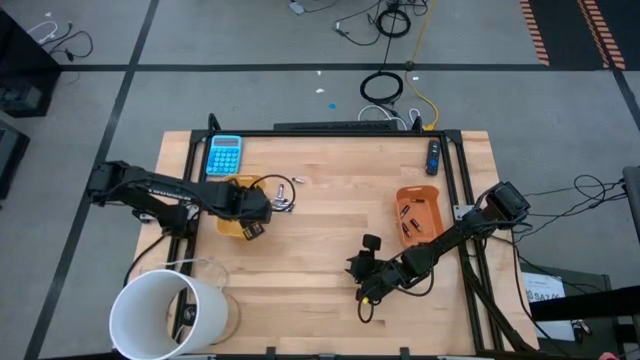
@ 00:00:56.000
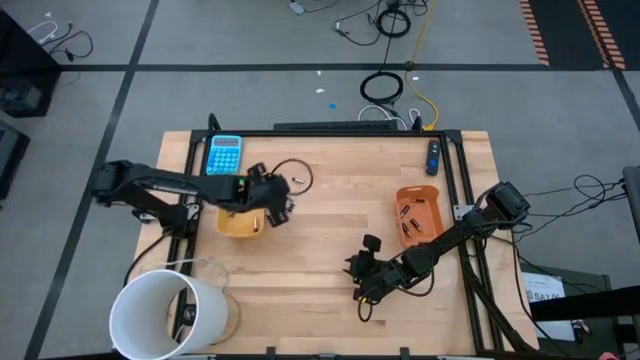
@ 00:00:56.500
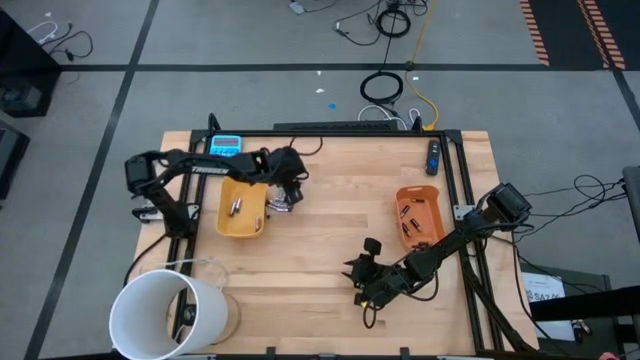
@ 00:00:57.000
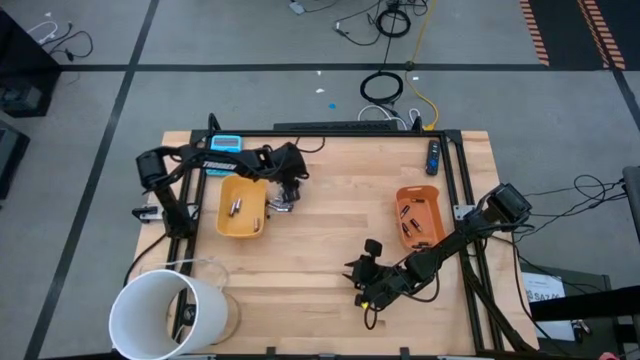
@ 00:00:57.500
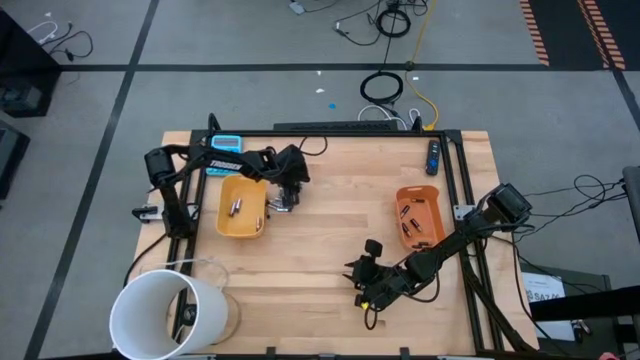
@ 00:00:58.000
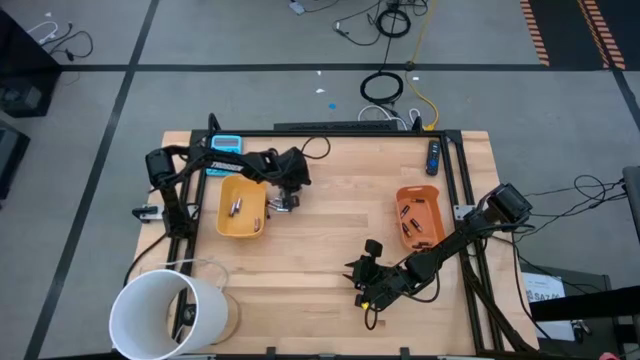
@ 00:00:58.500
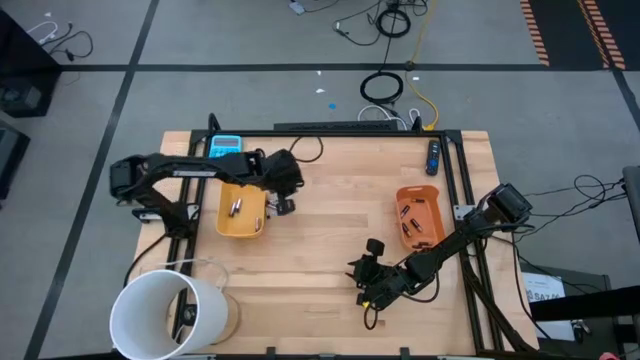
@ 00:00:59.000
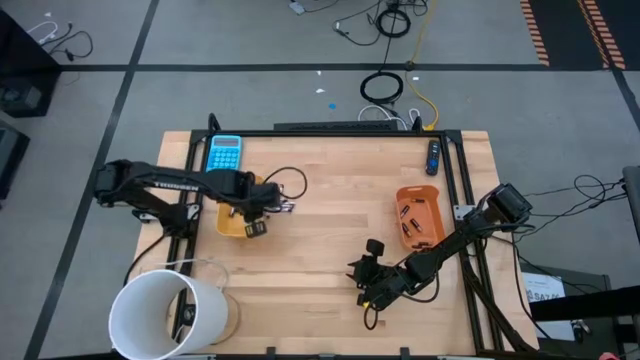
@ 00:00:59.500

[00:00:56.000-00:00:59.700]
Task: Sort batteries
Put the silver battery into the yellow bin

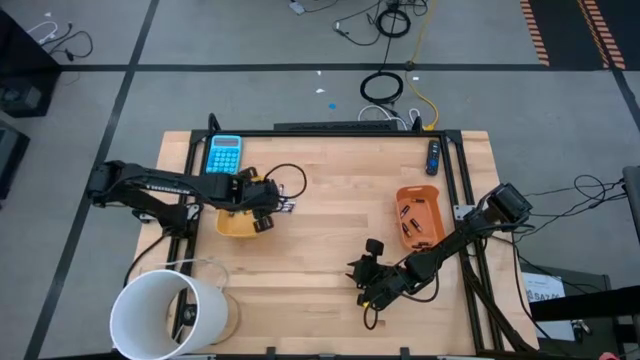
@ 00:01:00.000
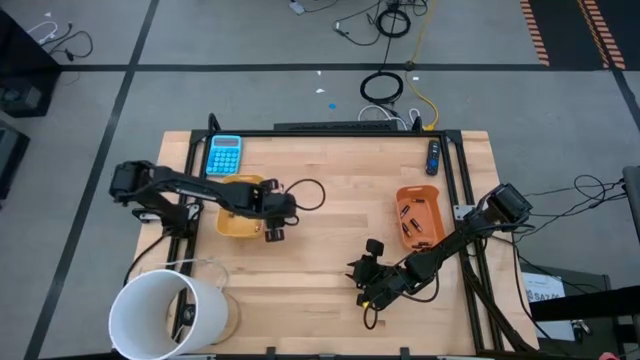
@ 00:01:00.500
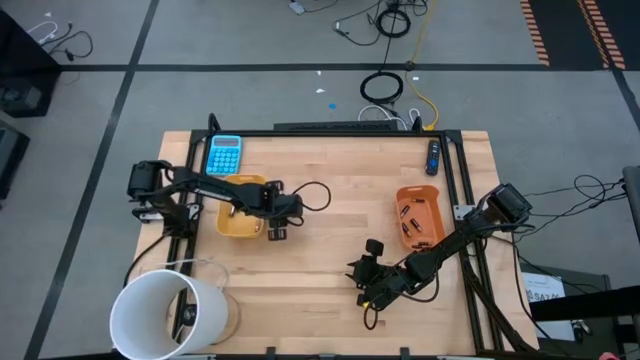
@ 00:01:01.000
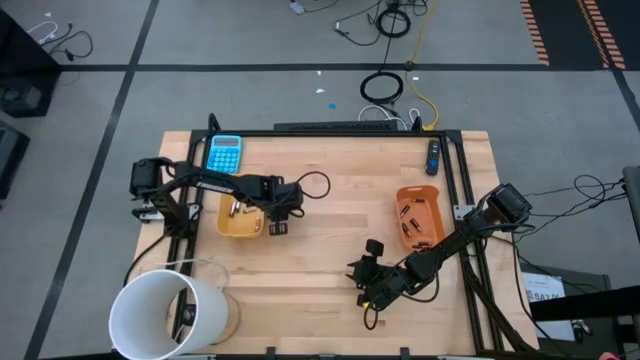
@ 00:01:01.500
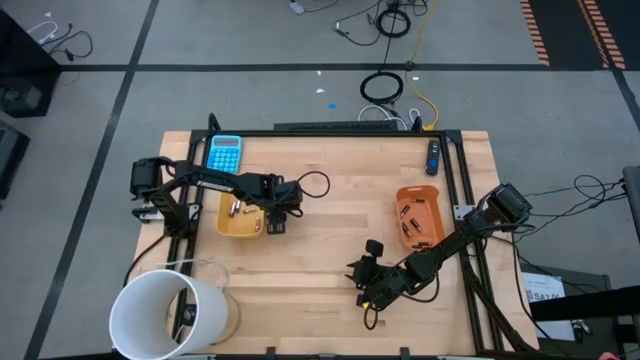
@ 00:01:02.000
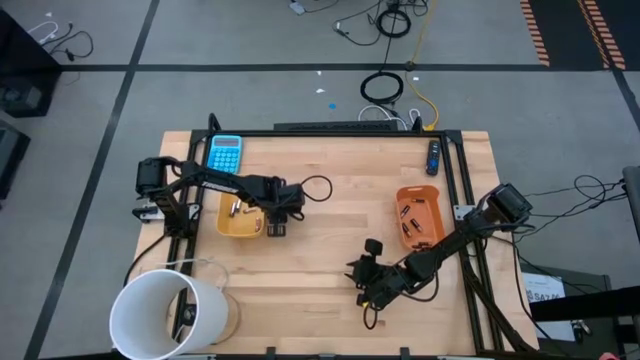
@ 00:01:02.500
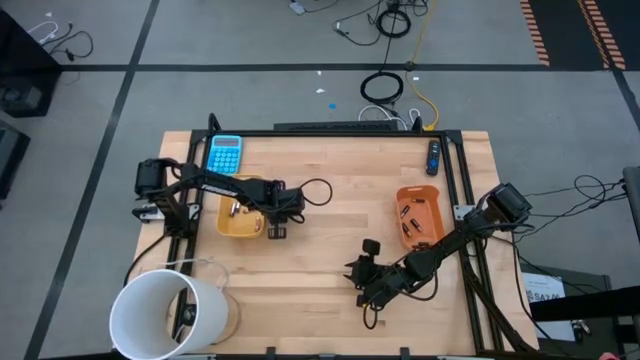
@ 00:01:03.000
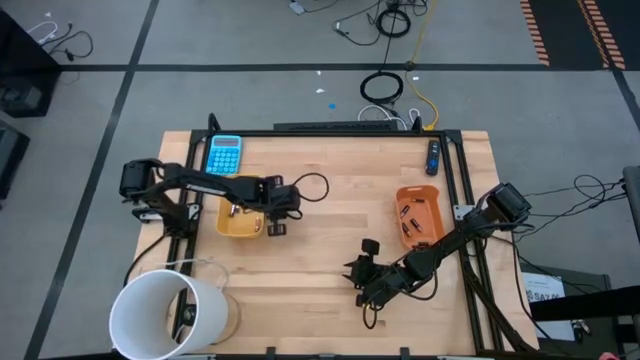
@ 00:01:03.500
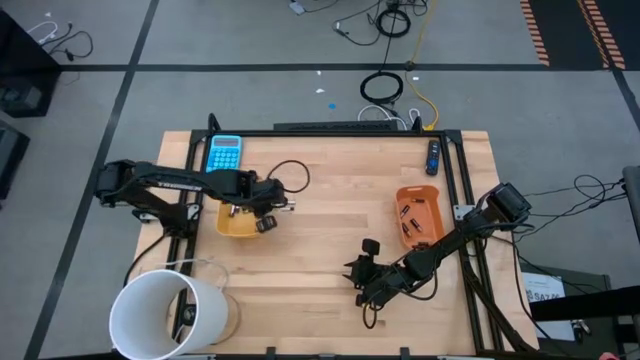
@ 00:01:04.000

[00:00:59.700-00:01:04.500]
Put the silver battery into the yellow bin

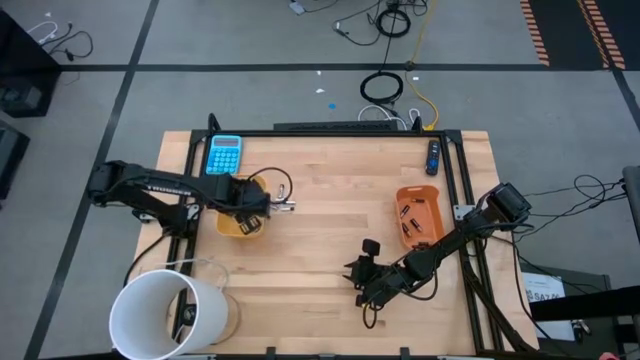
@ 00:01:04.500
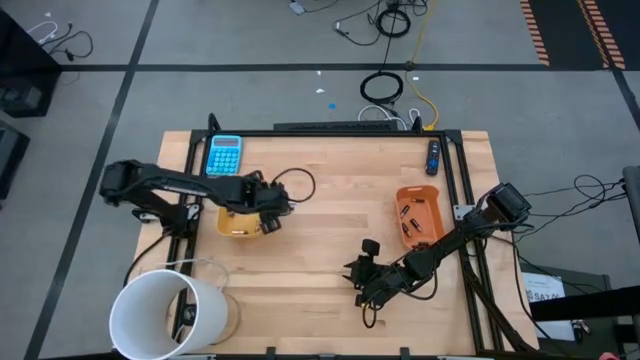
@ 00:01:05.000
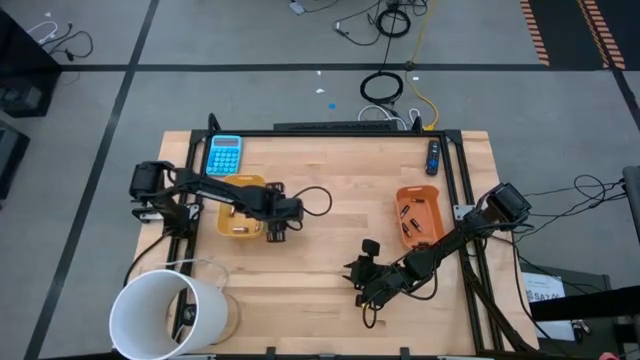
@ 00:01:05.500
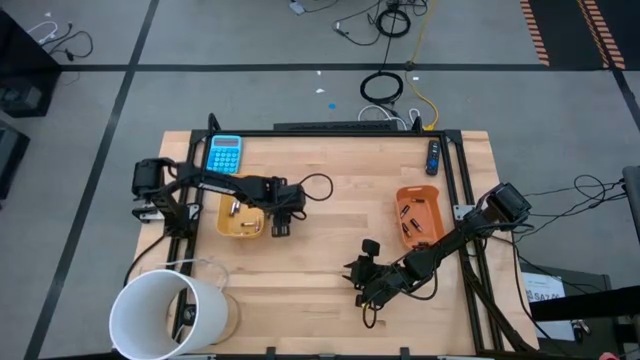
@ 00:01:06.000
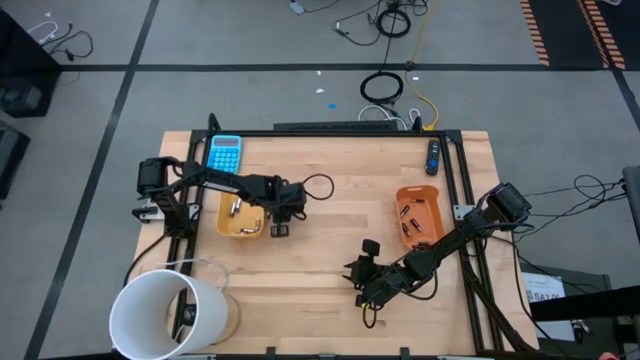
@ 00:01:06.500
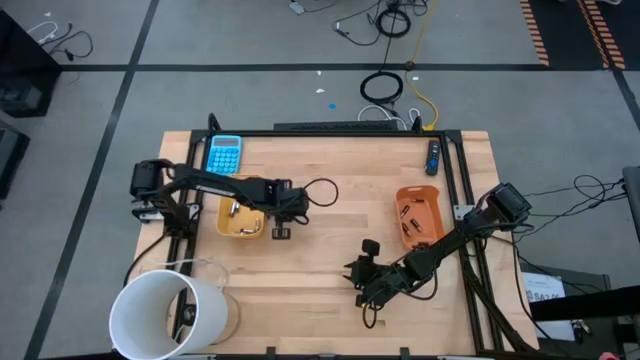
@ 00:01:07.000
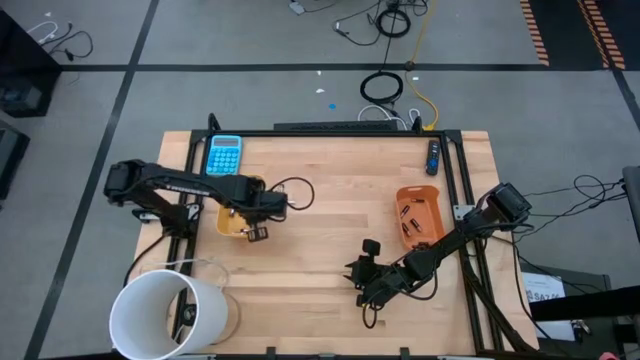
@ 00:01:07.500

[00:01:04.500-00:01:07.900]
Put the silver battery into the yellow bin

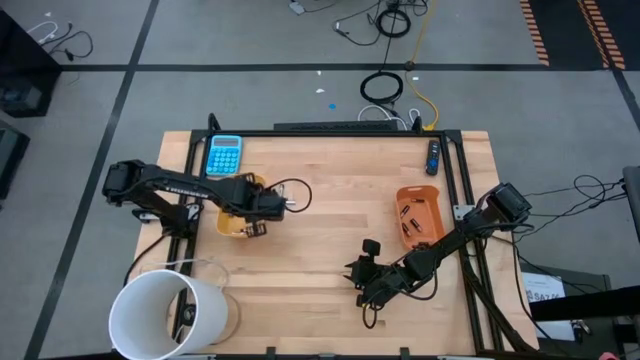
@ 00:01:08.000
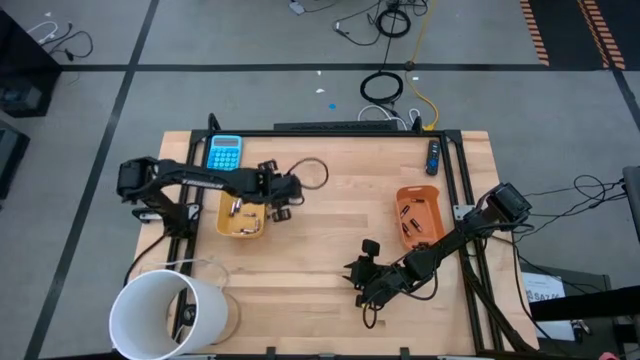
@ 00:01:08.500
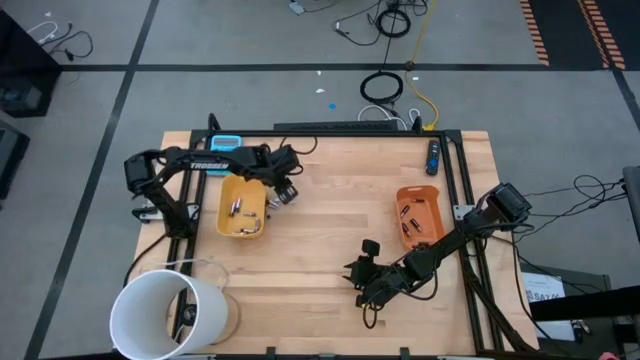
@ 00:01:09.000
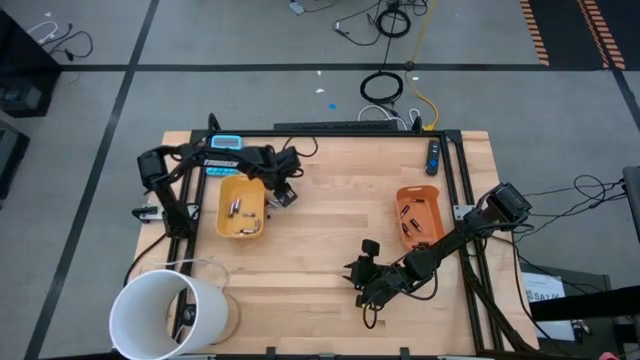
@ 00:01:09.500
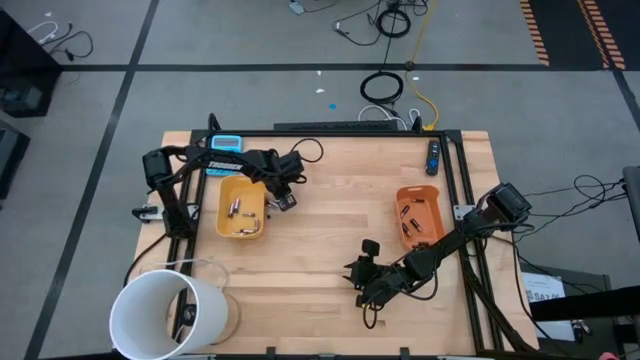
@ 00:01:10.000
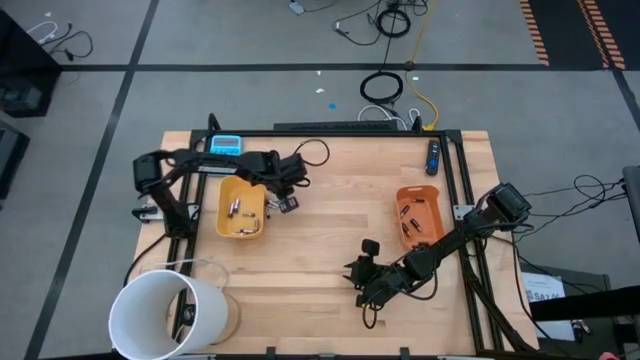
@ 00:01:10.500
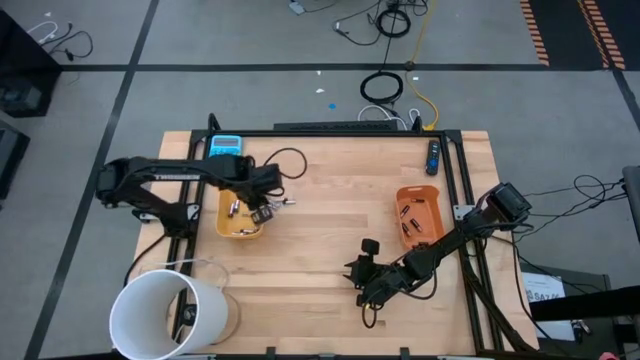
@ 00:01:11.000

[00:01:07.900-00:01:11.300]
Put the silver battery into the yellow bin

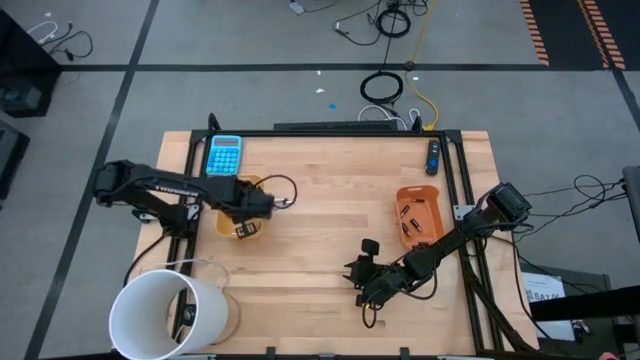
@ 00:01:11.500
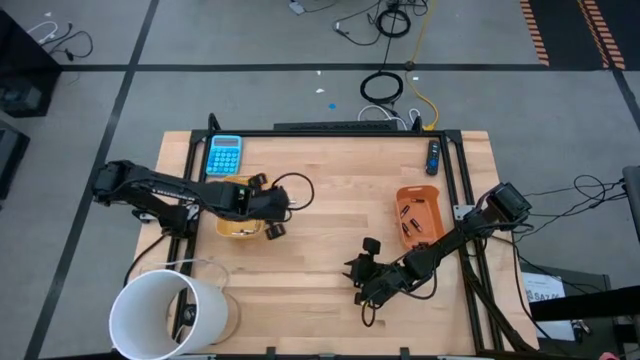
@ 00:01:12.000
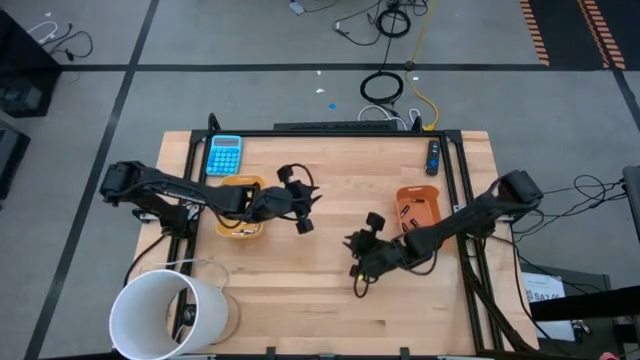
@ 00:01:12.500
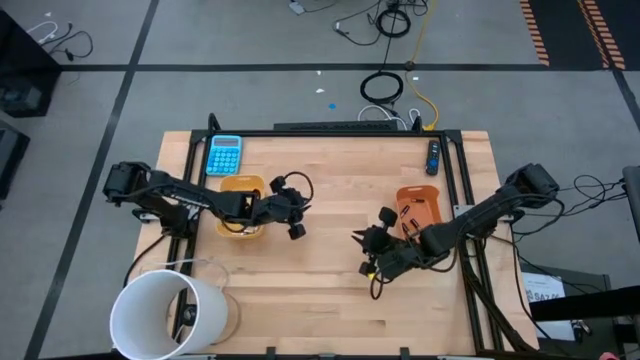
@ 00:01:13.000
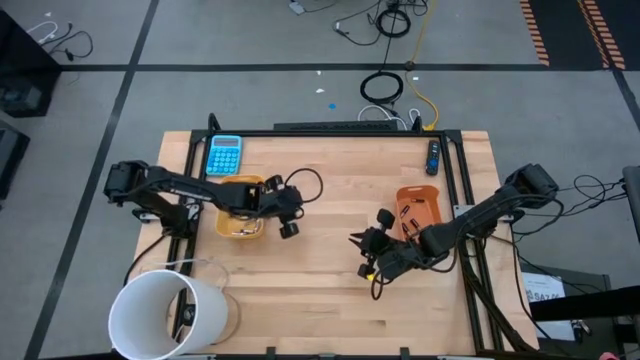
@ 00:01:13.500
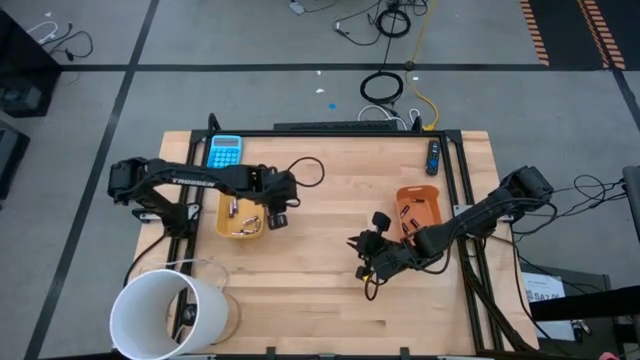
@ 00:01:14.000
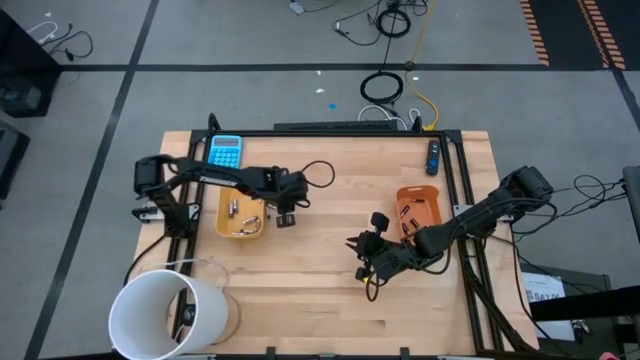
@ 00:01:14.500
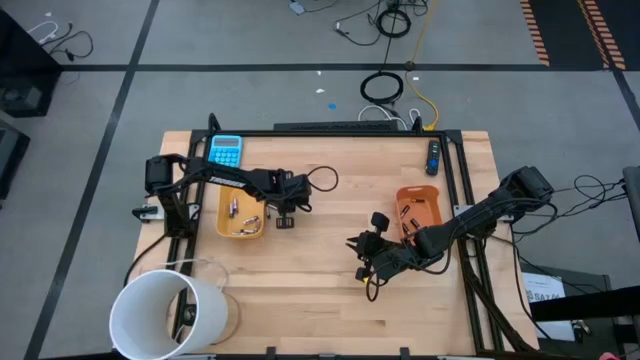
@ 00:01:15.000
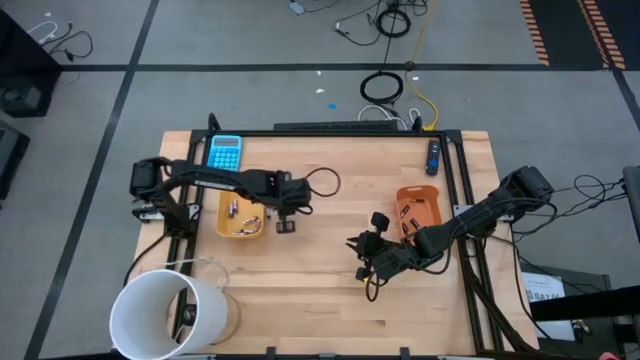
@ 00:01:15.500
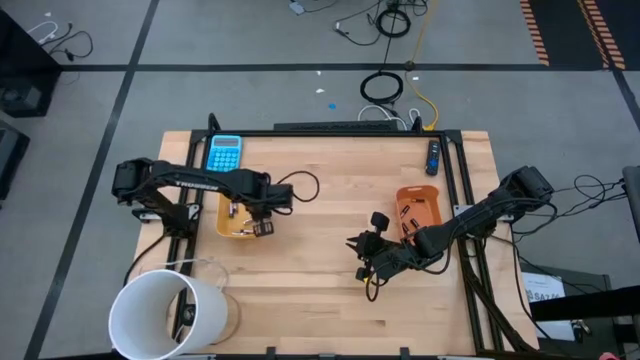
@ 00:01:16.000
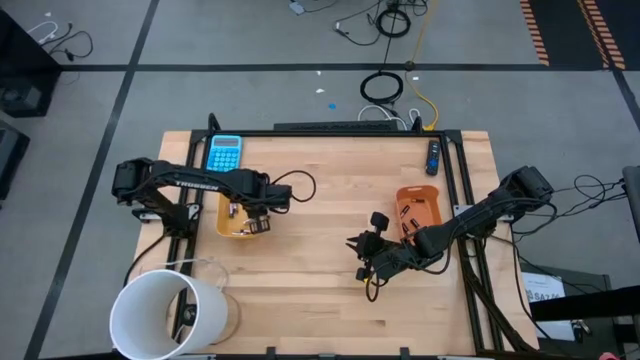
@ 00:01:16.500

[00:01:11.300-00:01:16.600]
Put the silver battery into the yellow bin
